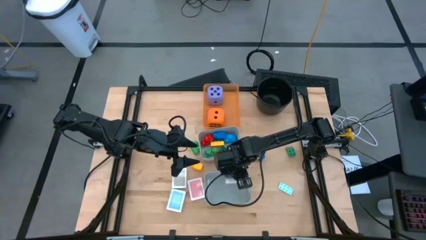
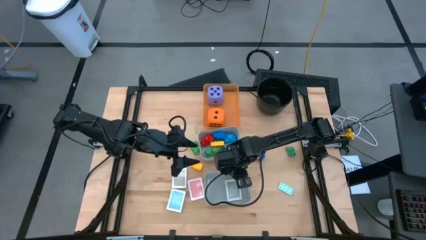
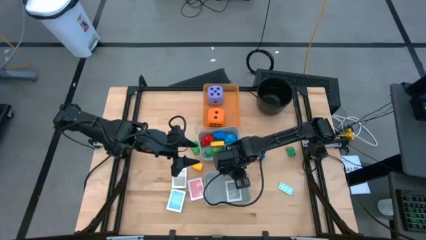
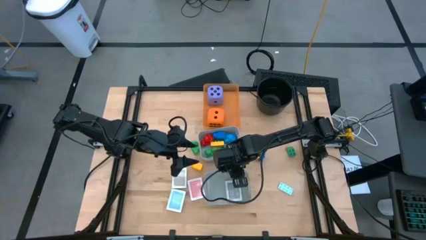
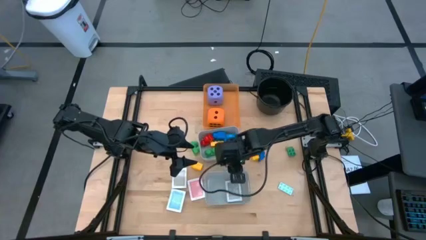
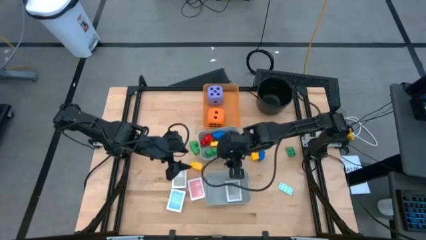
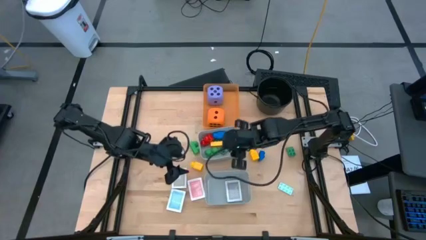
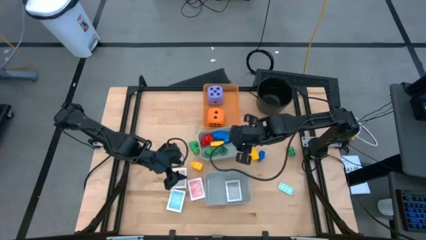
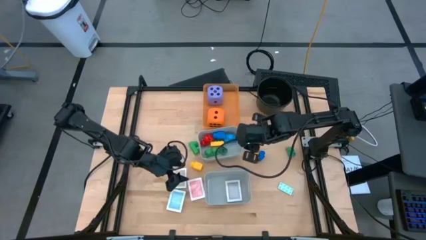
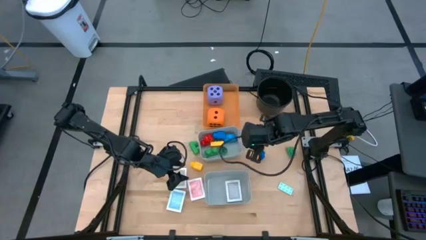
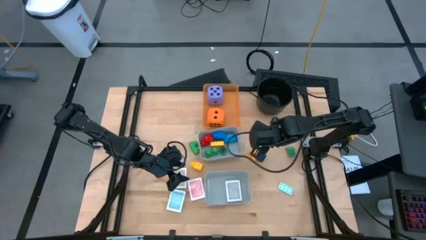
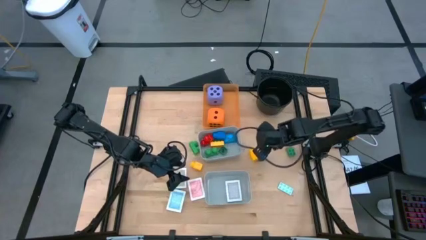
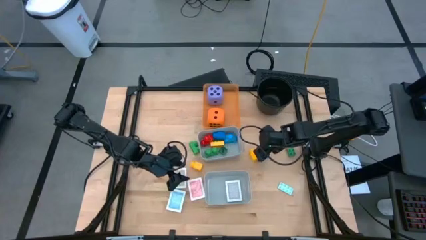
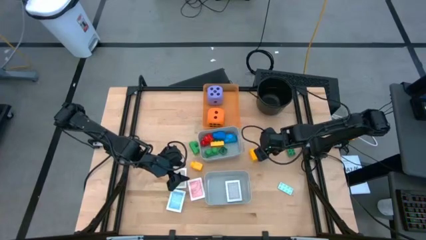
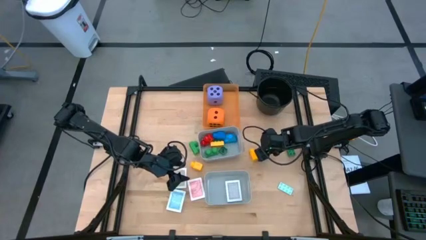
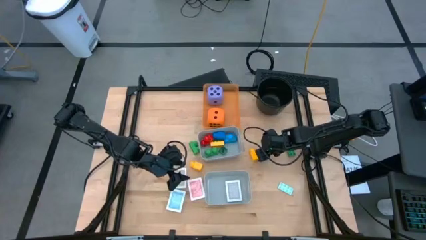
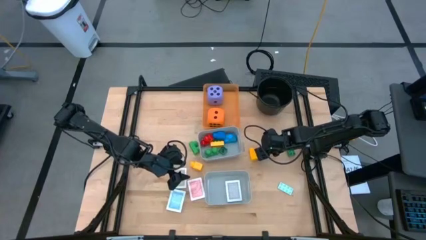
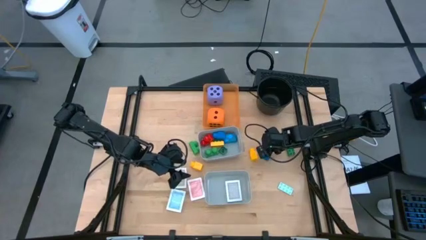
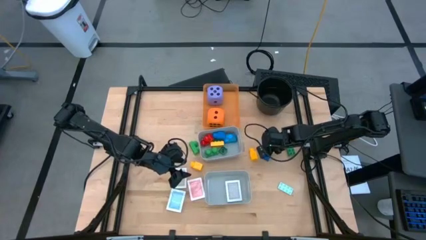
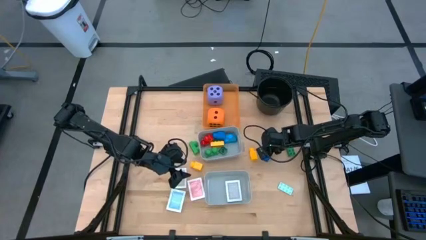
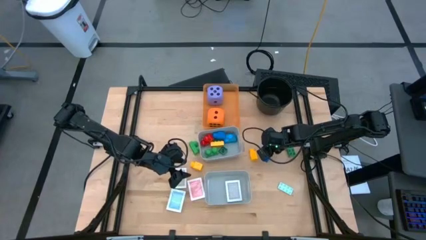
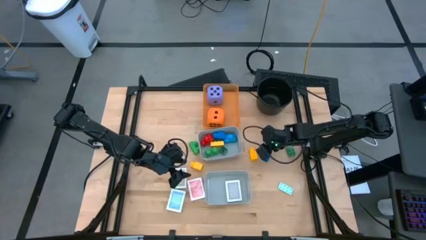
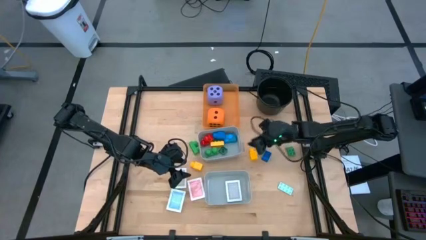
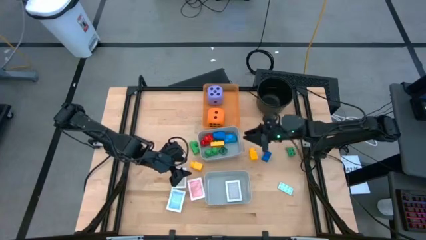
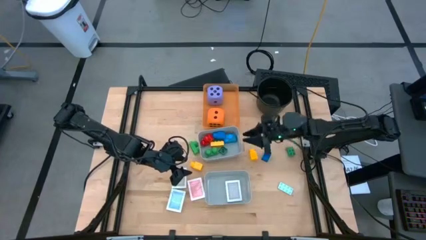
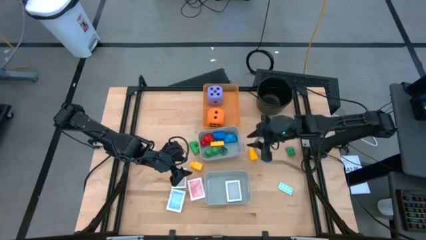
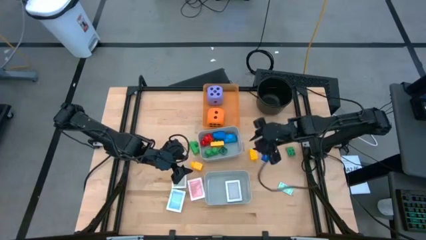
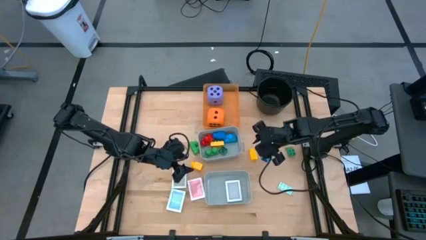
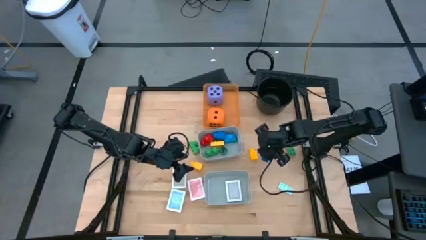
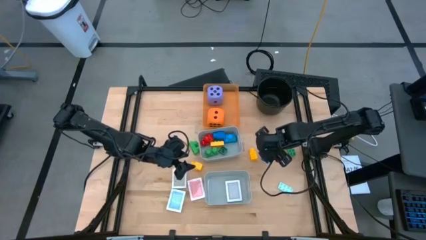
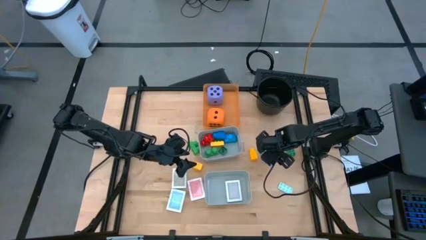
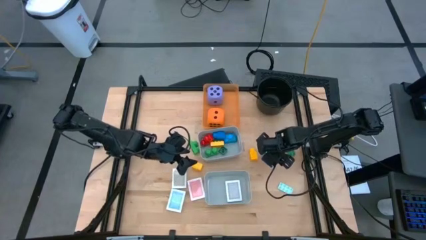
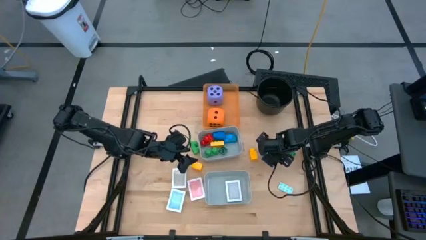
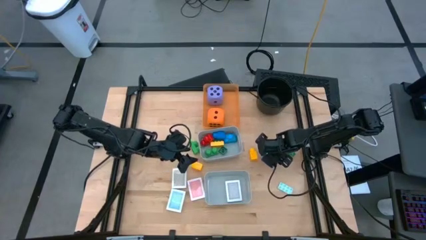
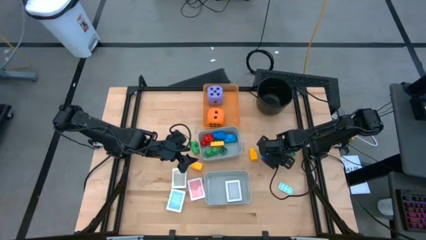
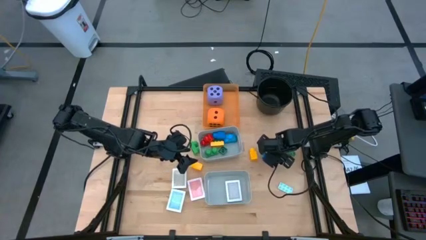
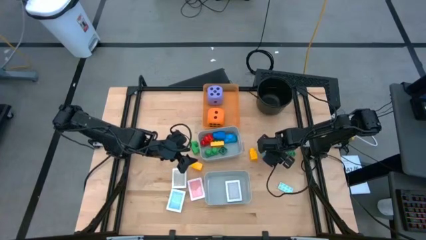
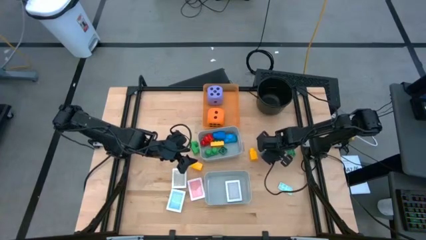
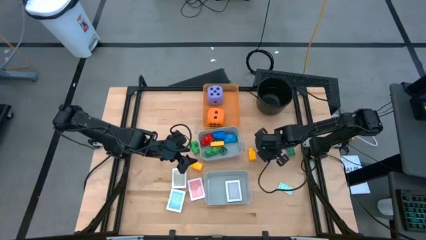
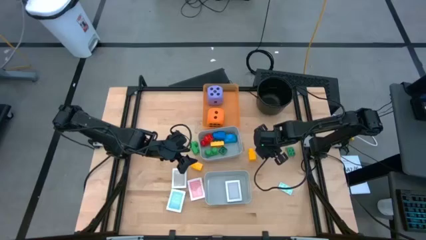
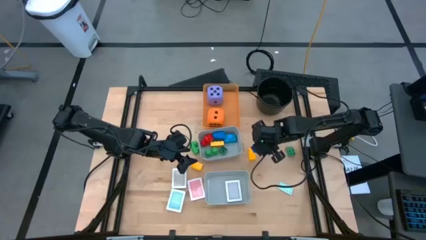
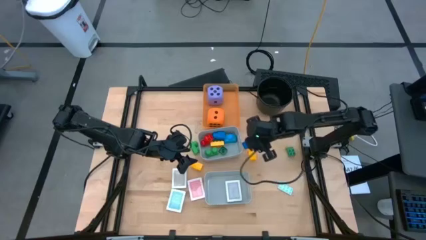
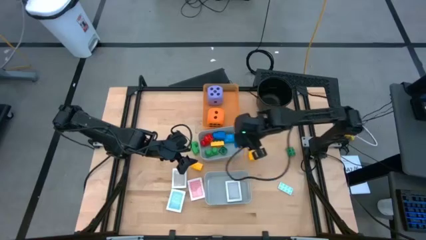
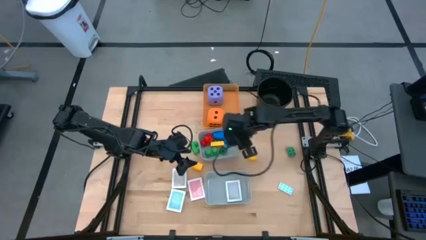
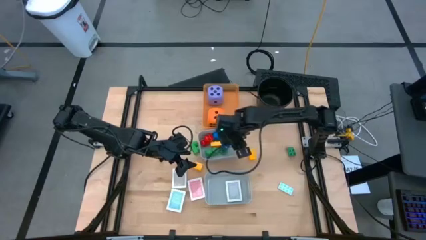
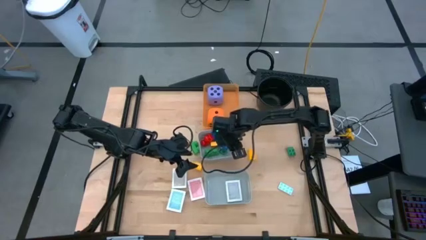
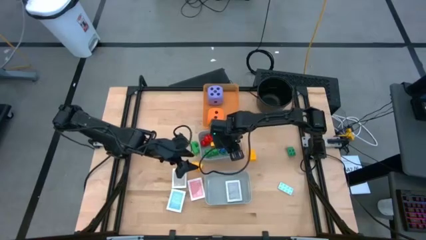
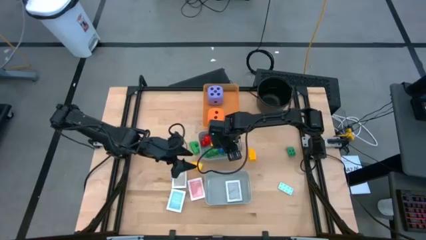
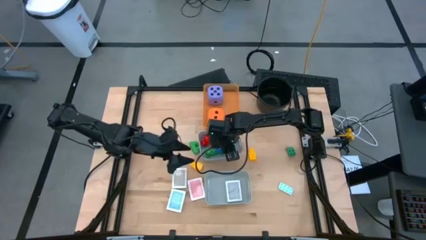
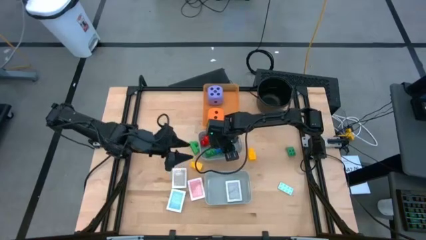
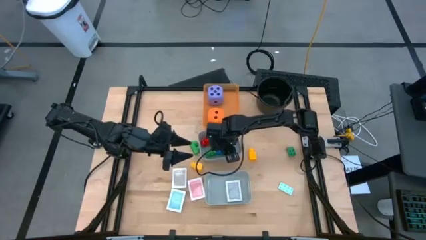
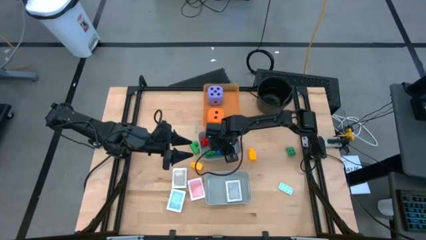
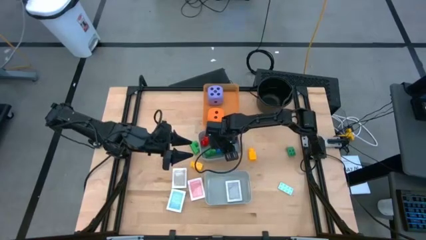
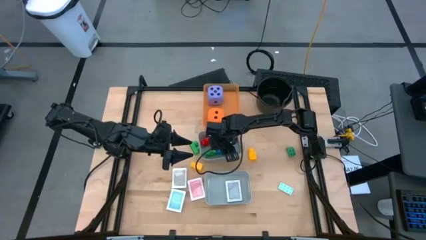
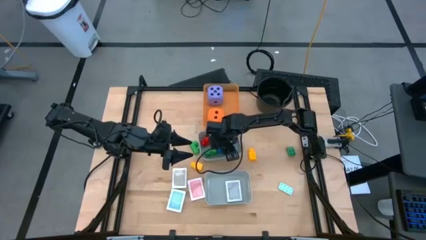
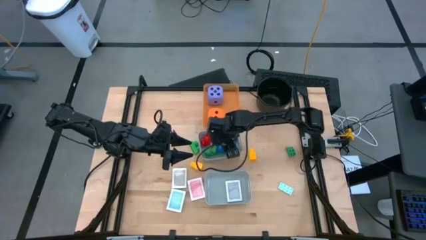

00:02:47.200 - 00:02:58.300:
Task: Pick & Place Toys
Put the blue game piece into the top gray bin

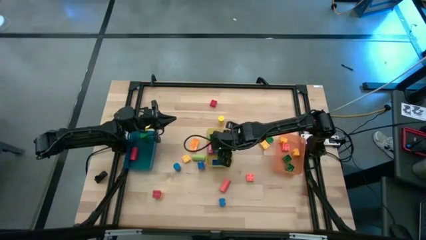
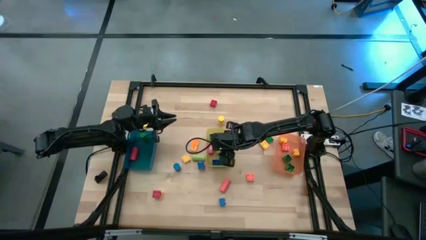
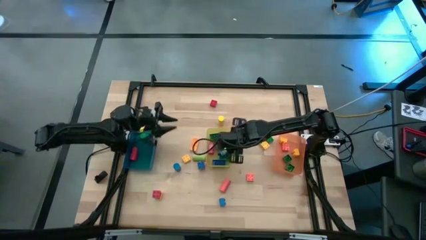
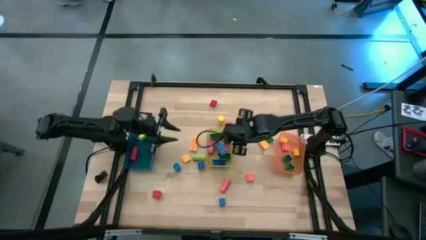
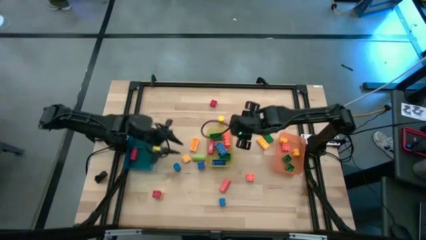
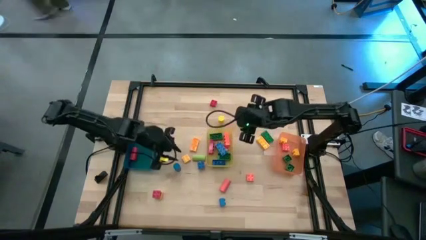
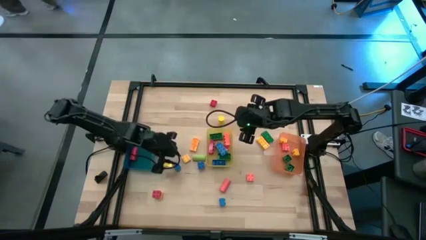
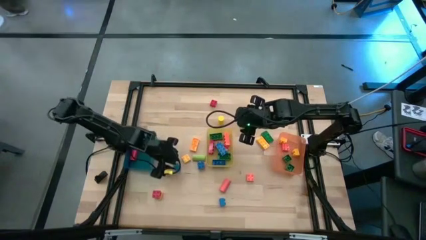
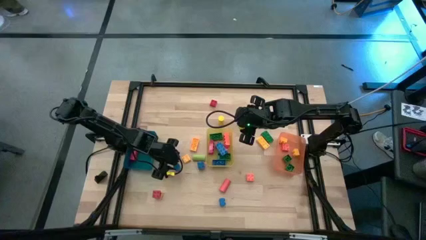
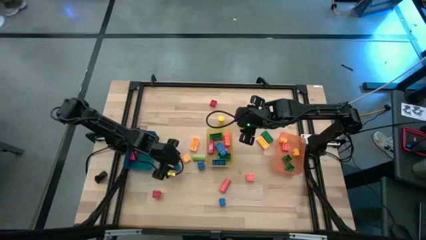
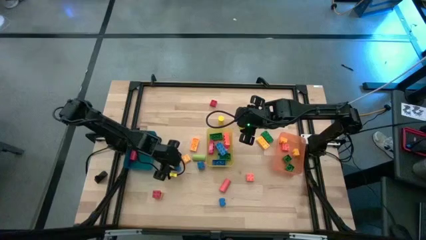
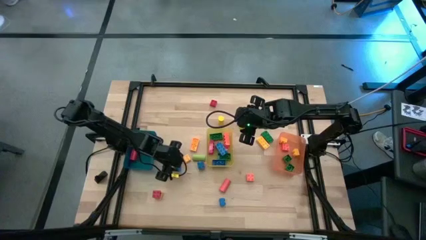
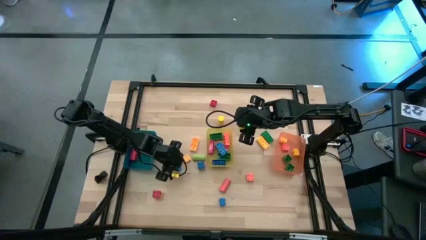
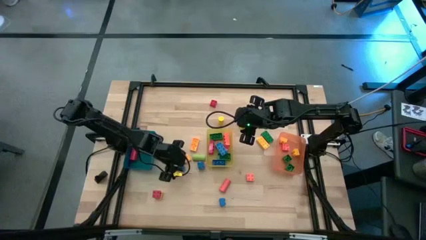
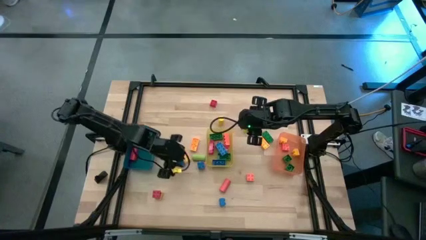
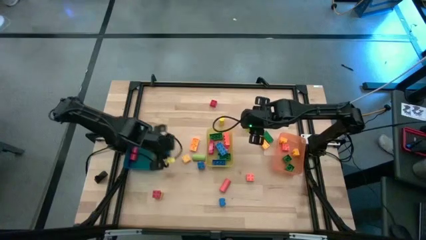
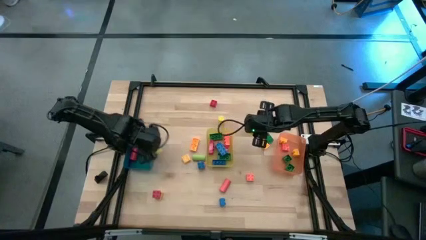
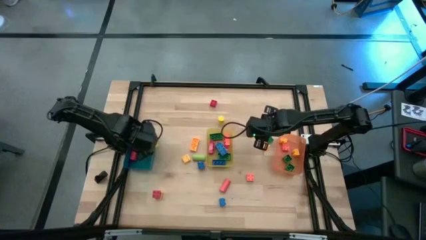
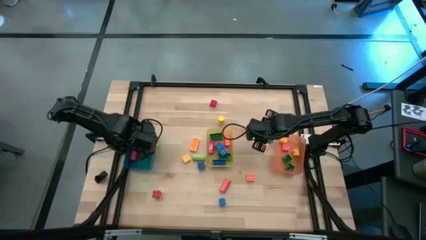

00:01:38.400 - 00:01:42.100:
Task: Sort blocks by size
Put the blue cylindrical block into the blue bin
